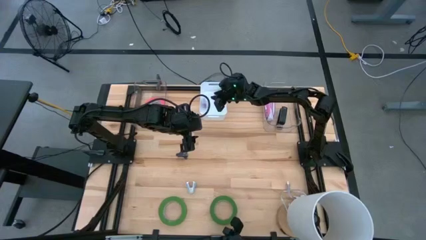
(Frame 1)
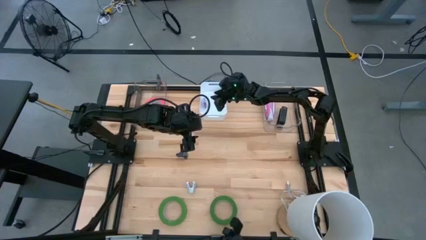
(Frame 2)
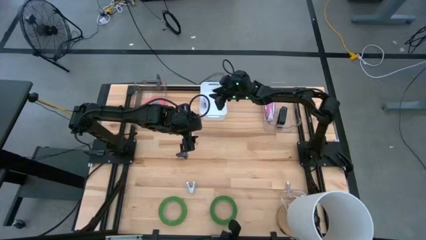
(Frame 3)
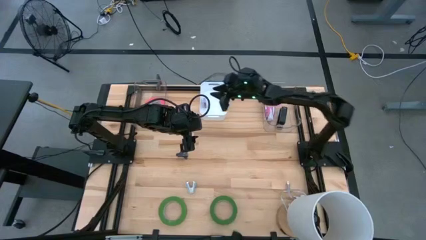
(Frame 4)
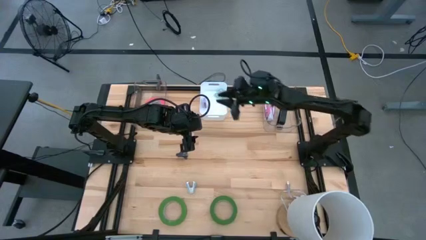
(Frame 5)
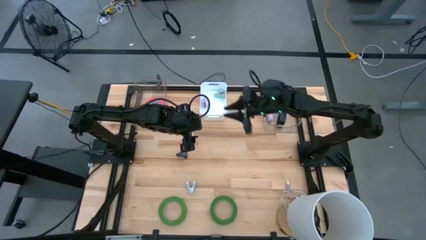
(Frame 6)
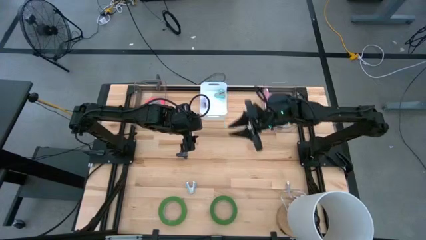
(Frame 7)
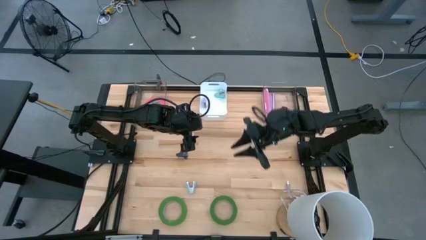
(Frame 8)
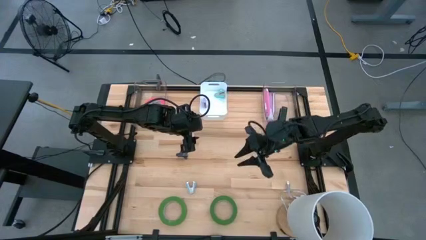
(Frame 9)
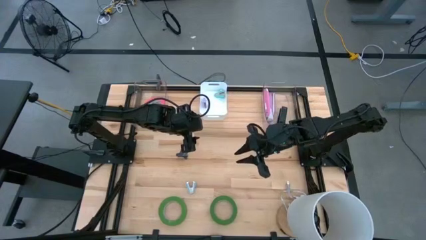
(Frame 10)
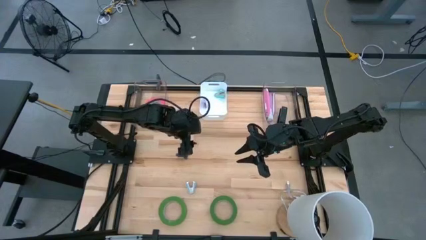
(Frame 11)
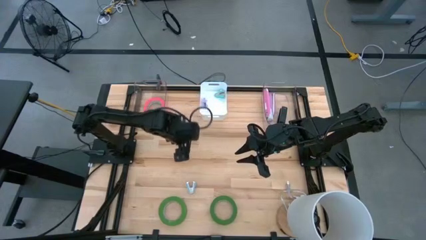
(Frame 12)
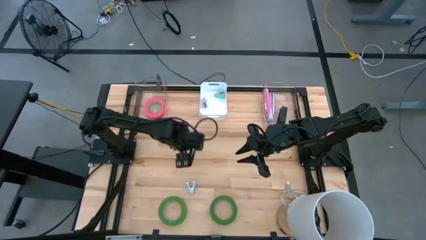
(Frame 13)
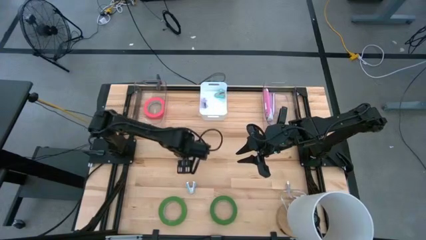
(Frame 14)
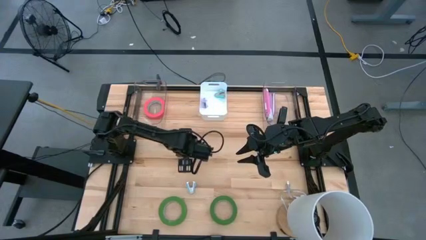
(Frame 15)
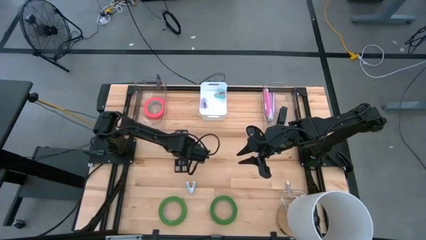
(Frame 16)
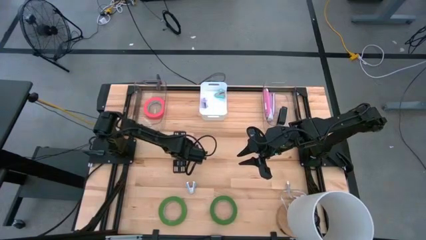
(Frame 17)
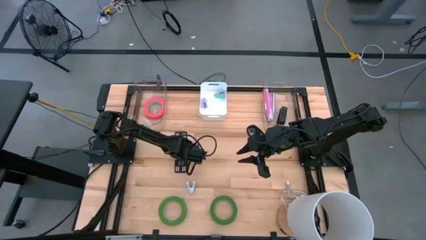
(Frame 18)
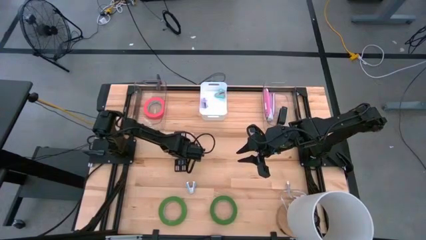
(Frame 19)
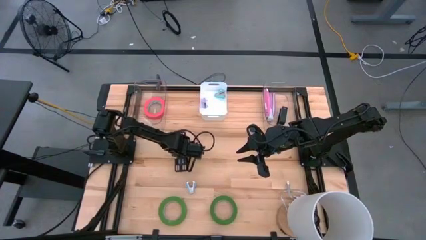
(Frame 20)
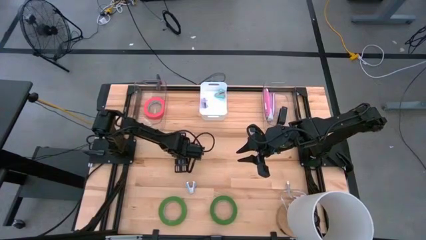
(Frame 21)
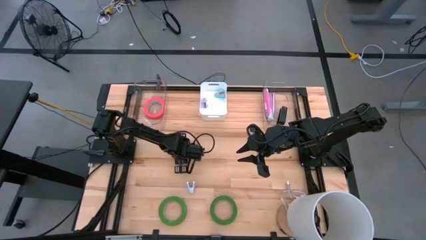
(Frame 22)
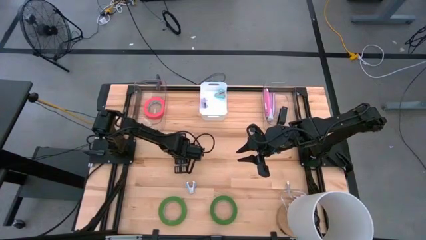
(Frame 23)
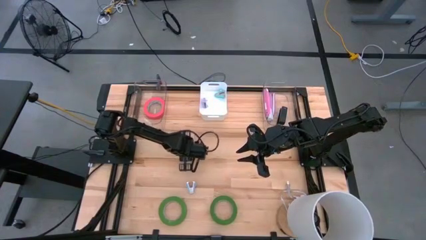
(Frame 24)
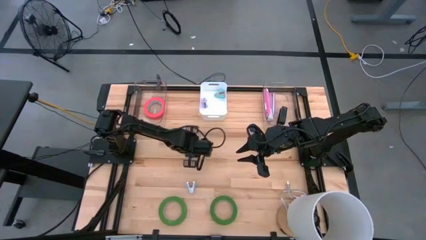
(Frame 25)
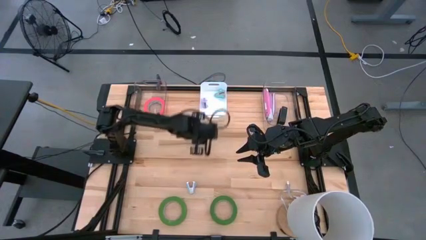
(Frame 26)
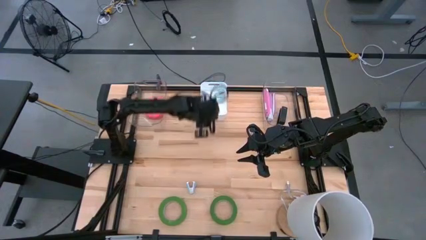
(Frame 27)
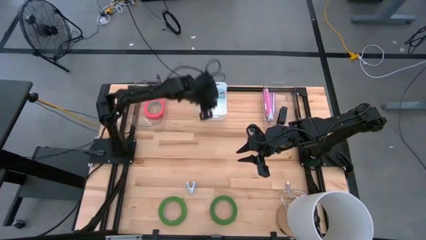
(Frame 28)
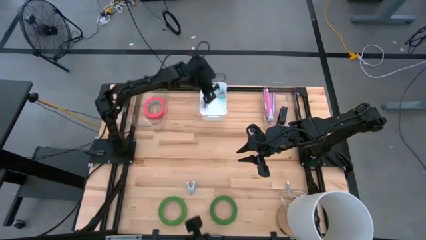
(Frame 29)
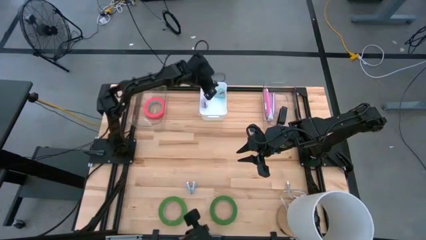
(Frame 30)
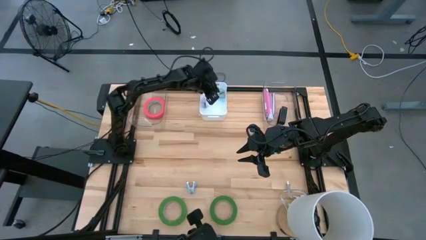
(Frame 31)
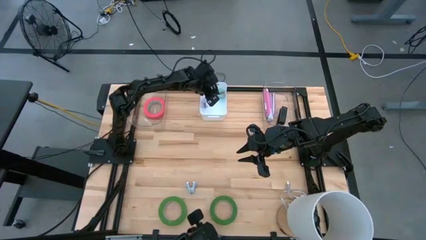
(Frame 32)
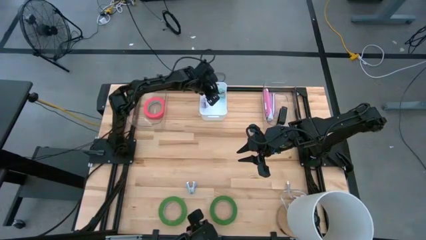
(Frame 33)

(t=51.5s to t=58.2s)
Task: Pick and place Stapler, Stapler remover, tape
Put the black staple remover into the white bin

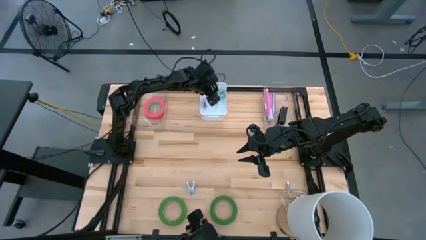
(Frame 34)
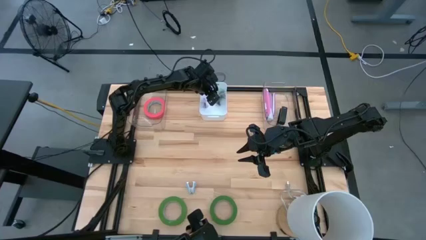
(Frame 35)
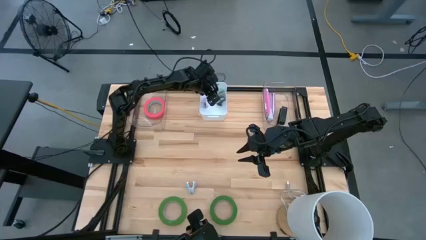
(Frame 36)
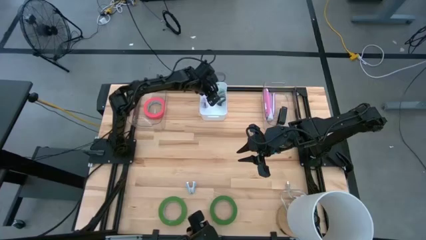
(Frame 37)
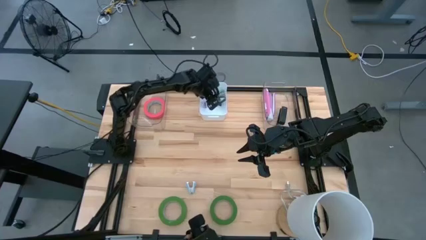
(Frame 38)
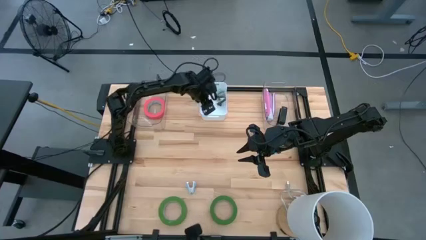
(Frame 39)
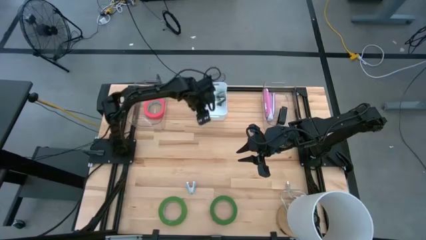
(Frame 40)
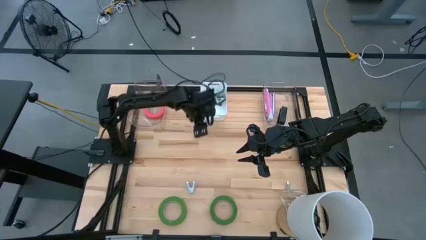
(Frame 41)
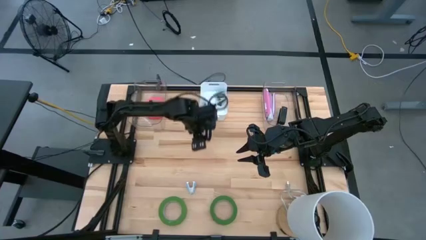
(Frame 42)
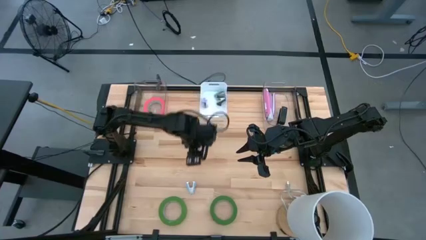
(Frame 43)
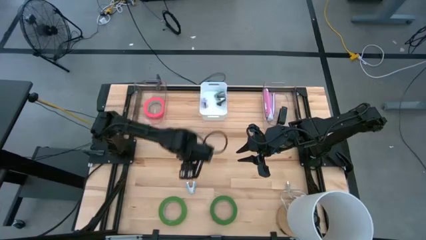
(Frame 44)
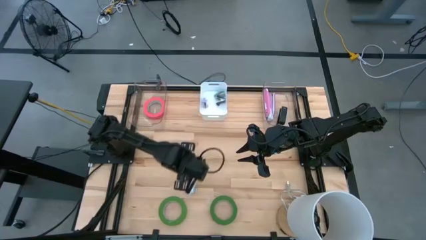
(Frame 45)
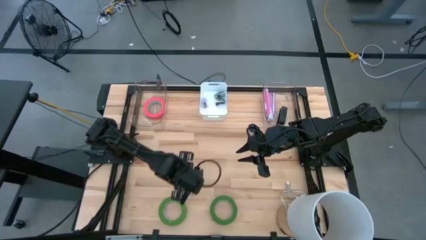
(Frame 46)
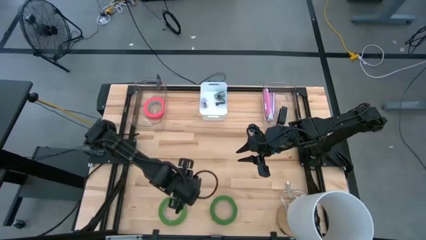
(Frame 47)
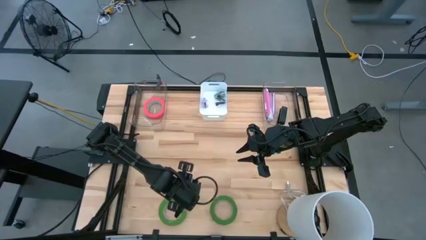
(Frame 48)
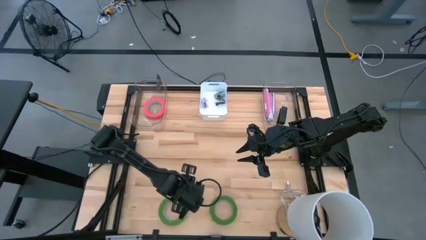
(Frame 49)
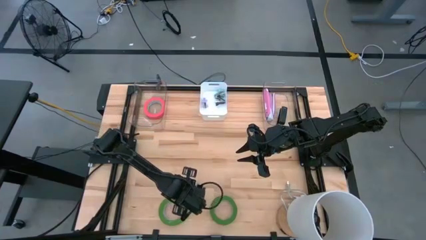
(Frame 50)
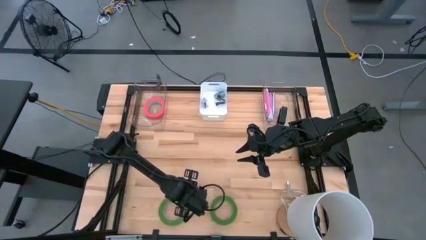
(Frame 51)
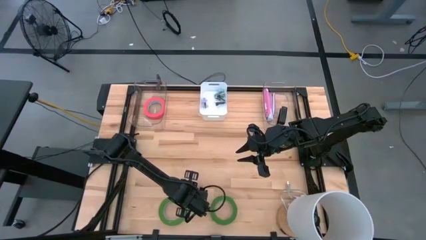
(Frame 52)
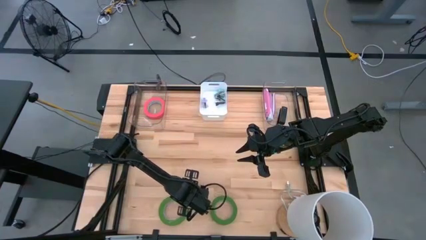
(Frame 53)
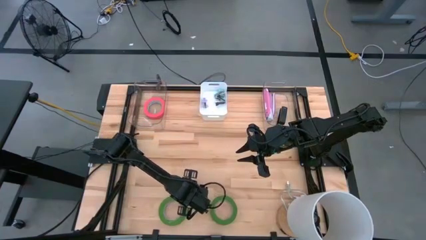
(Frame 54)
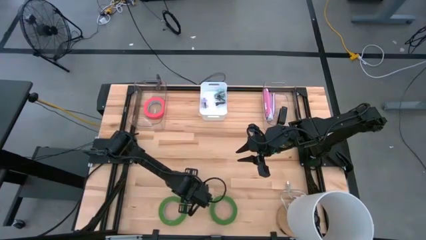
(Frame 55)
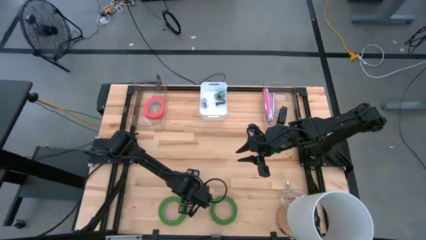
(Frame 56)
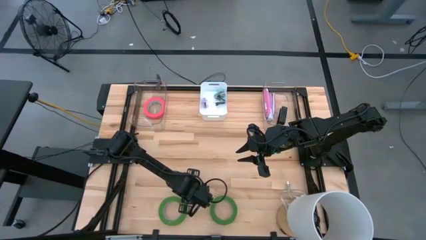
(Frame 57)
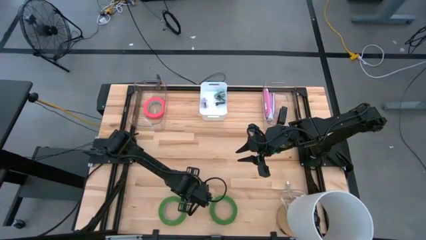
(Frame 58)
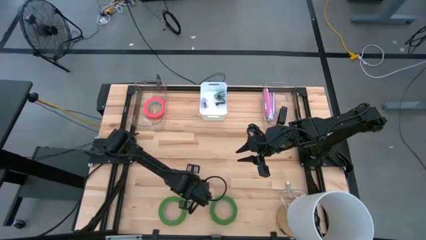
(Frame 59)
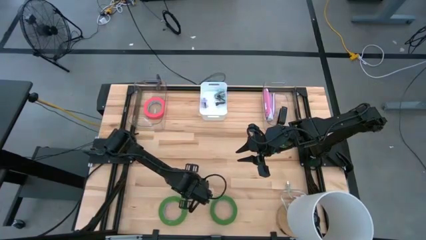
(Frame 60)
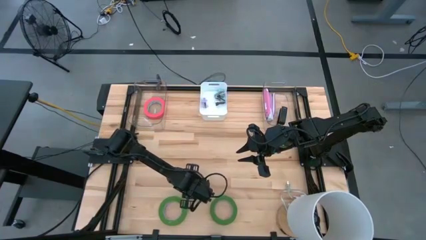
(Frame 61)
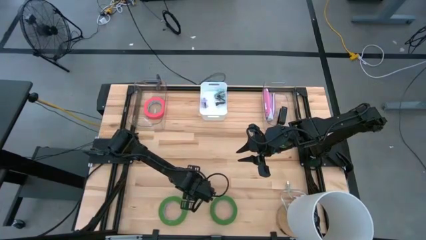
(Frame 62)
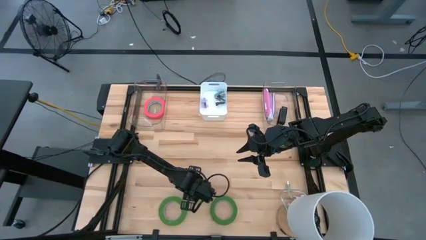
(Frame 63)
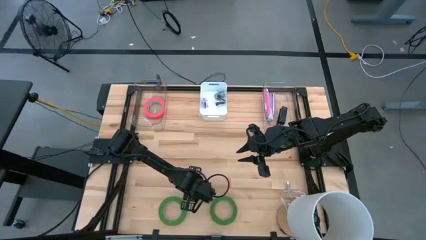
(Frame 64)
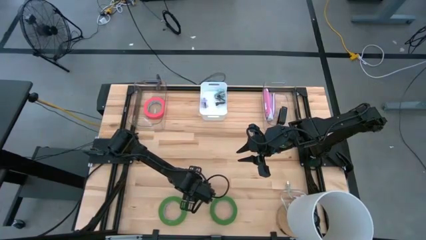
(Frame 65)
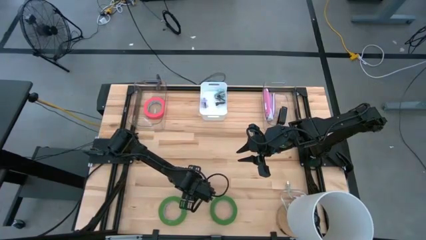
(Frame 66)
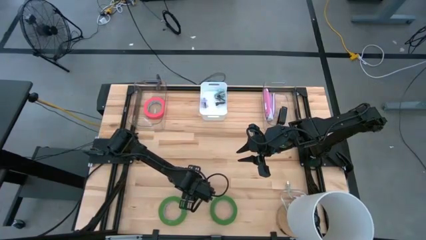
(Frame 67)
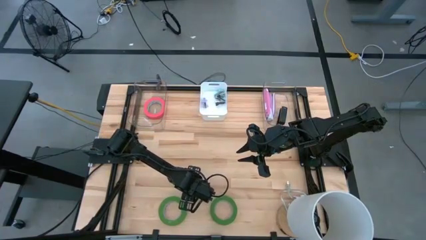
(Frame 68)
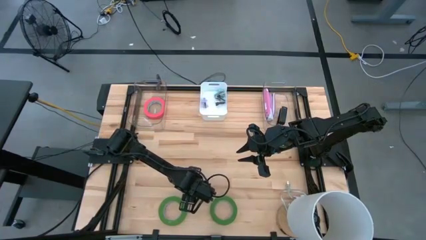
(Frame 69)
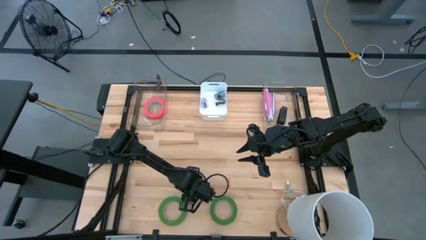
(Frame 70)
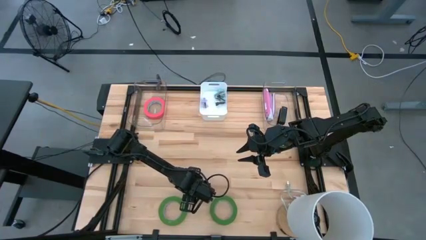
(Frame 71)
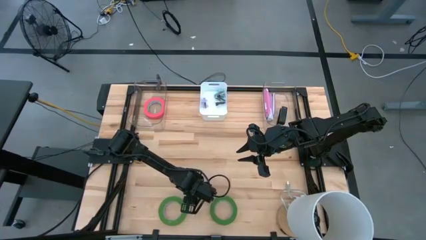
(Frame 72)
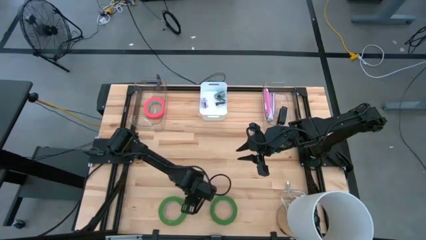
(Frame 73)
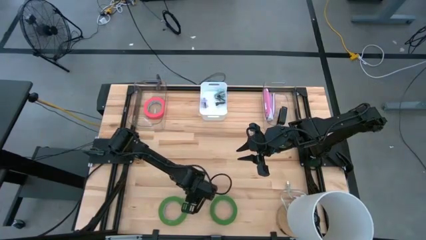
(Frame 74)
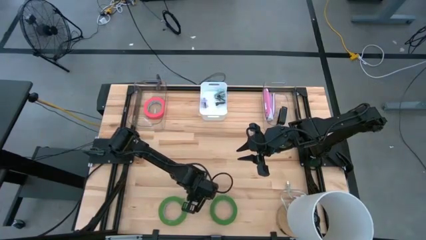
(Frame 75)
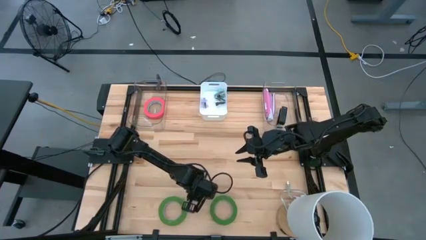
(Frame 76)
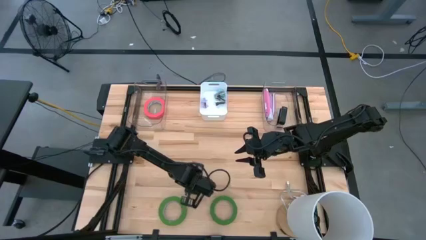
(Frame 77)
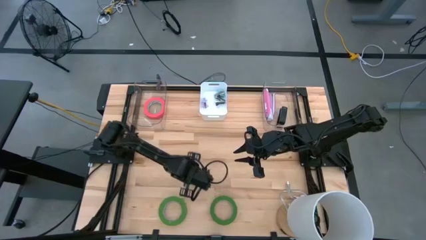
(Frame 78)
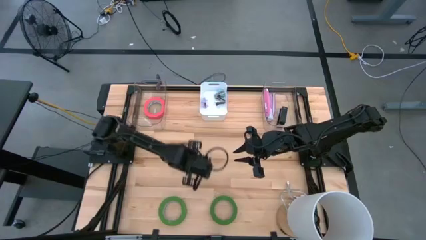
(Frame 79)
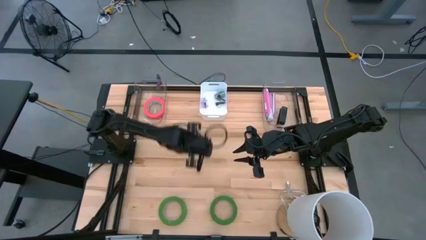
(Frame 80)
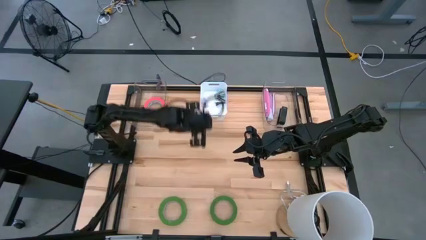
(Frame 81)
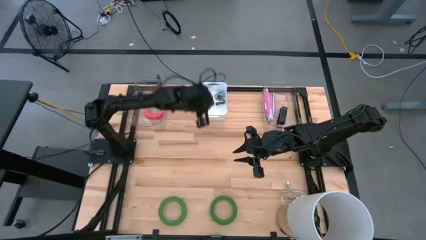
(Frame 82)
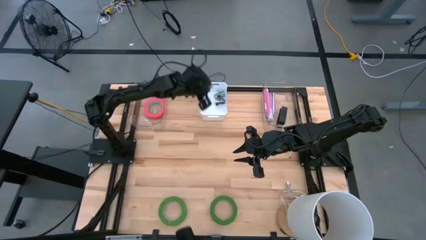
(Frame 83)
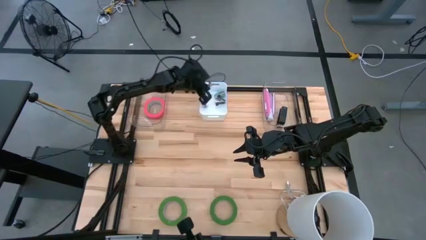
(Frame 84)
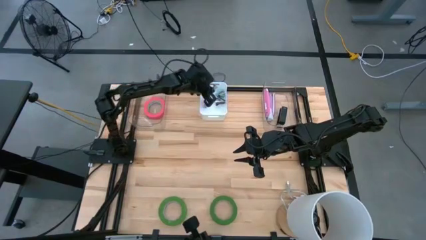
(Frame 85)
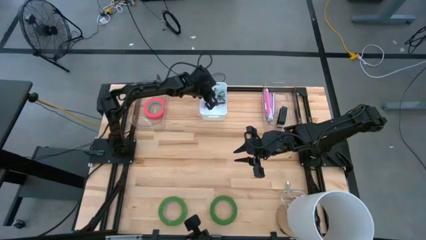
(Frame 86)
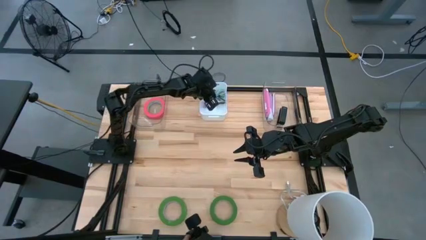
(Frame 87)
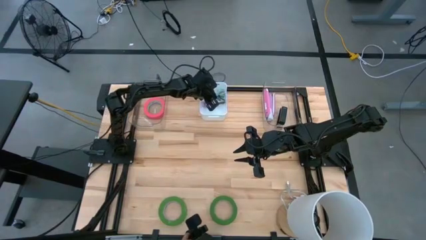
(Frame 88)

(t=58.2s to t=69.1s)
Put the light blue staple remover into the white bin
